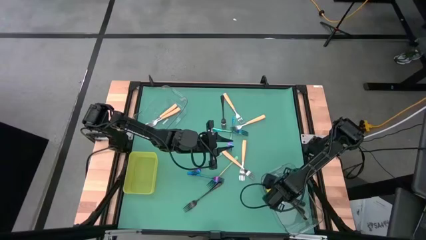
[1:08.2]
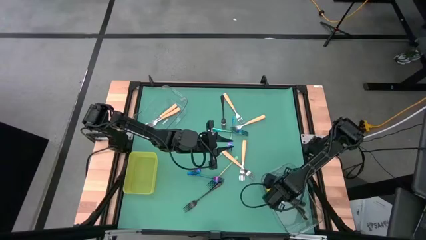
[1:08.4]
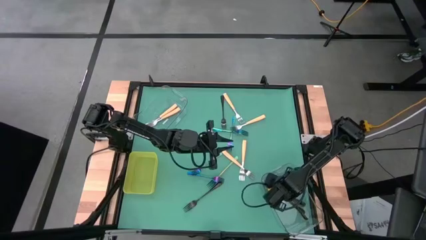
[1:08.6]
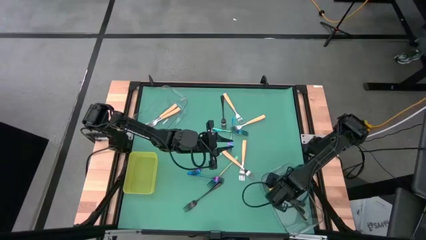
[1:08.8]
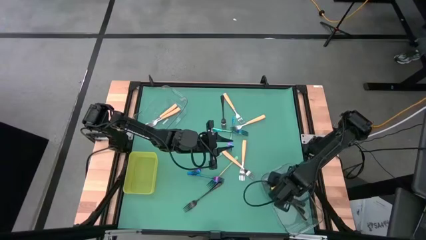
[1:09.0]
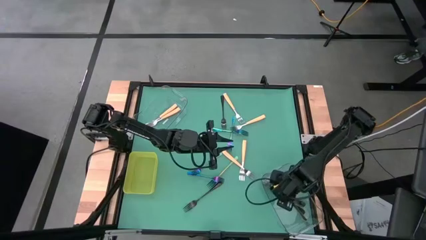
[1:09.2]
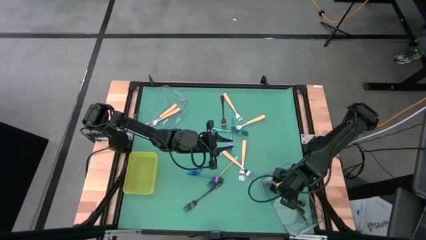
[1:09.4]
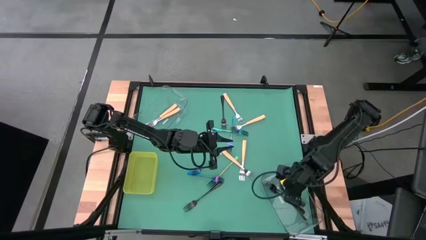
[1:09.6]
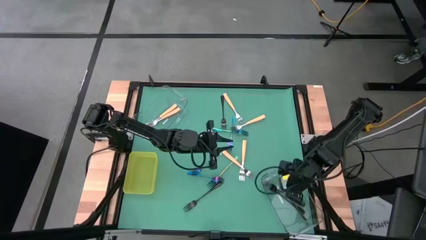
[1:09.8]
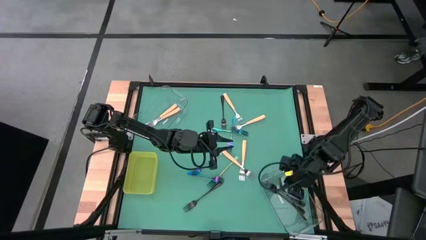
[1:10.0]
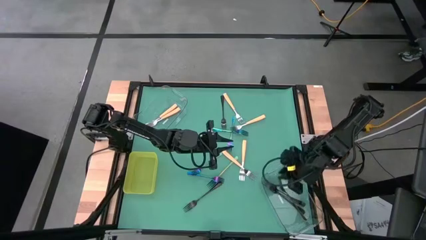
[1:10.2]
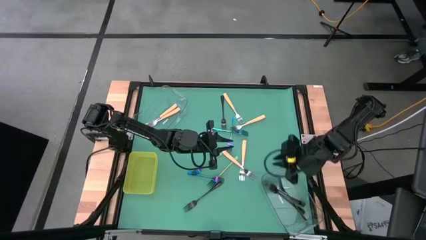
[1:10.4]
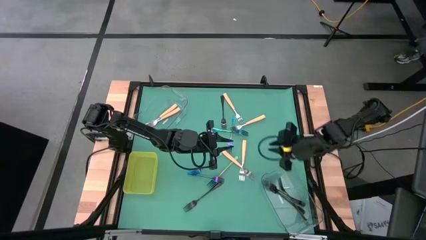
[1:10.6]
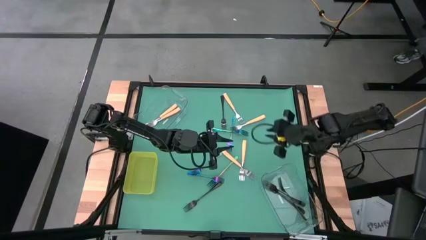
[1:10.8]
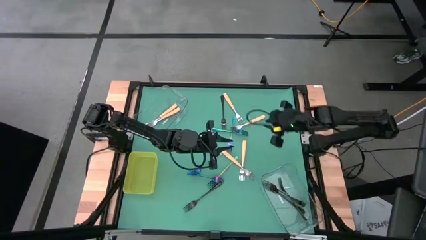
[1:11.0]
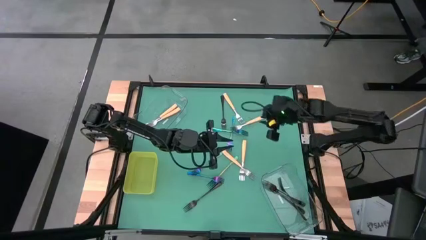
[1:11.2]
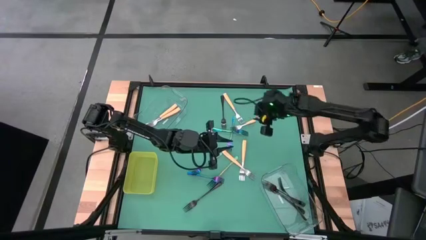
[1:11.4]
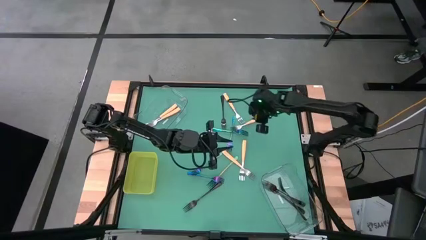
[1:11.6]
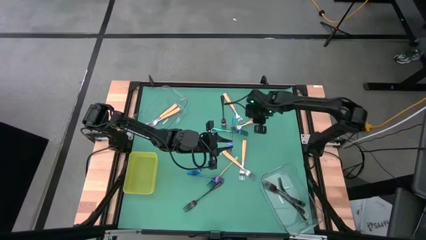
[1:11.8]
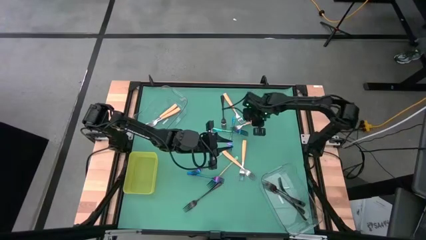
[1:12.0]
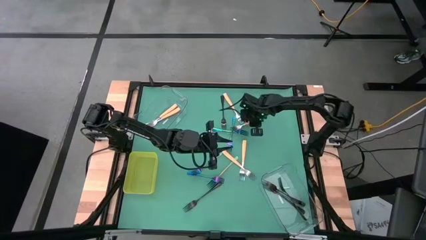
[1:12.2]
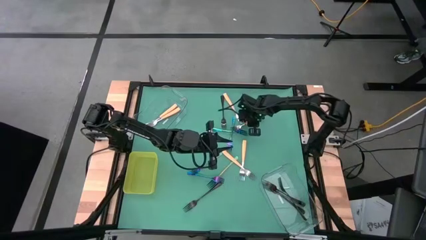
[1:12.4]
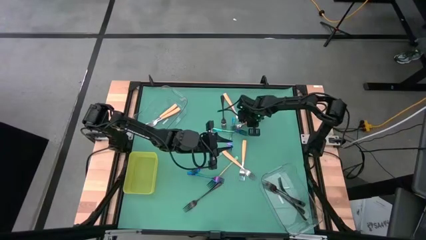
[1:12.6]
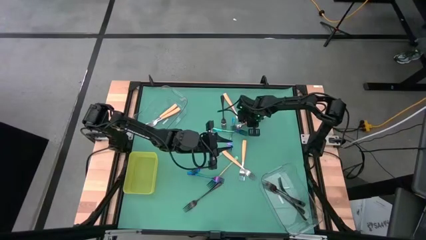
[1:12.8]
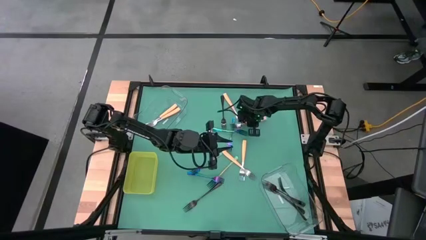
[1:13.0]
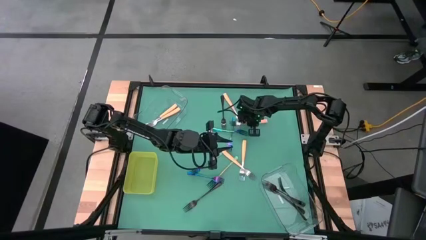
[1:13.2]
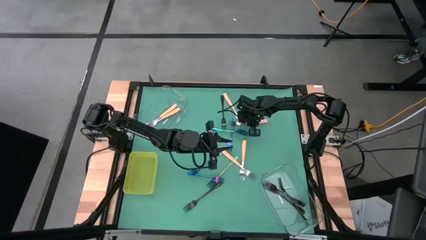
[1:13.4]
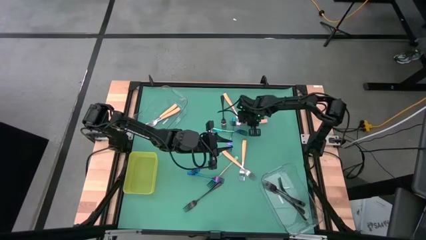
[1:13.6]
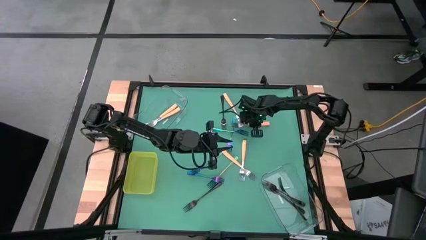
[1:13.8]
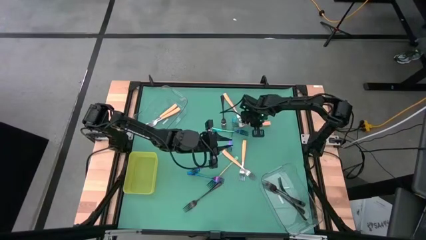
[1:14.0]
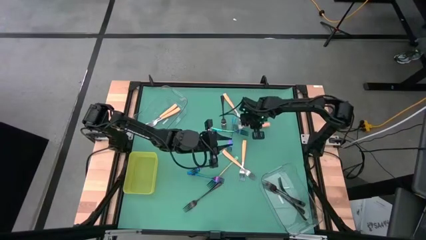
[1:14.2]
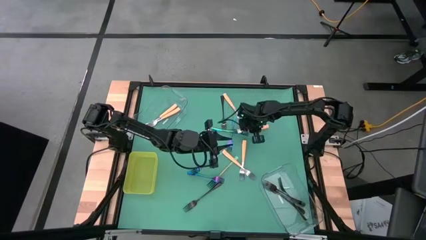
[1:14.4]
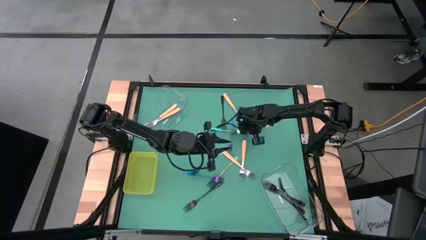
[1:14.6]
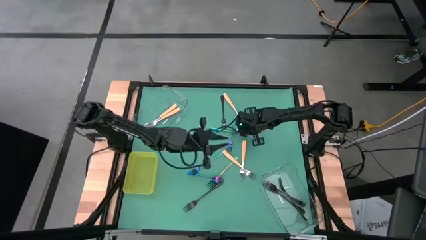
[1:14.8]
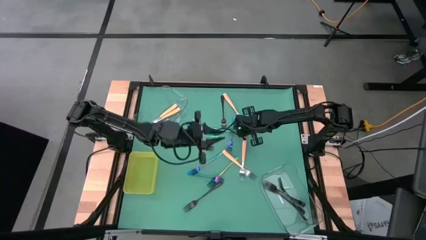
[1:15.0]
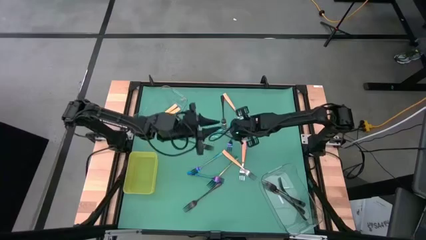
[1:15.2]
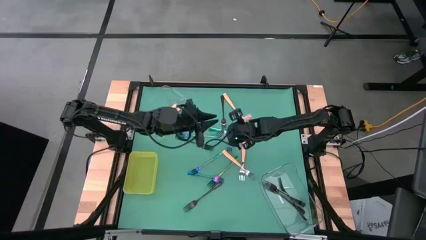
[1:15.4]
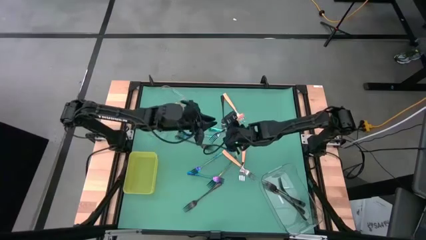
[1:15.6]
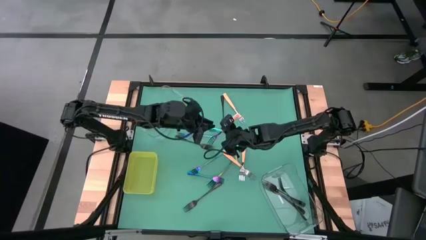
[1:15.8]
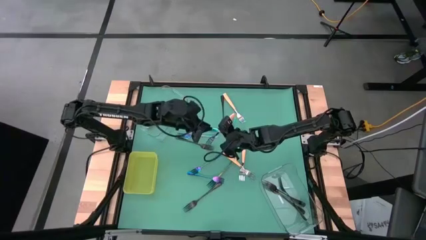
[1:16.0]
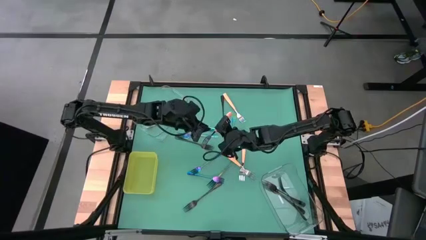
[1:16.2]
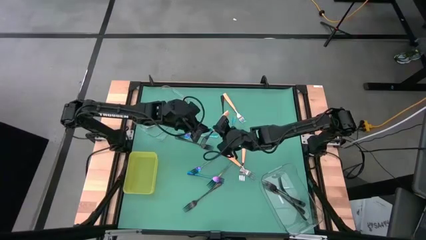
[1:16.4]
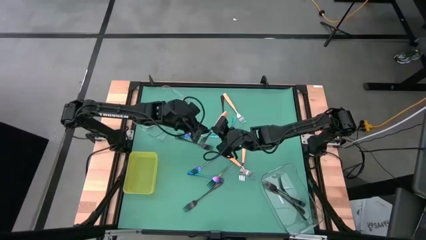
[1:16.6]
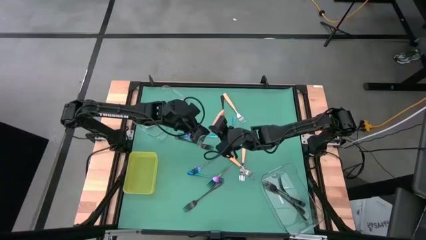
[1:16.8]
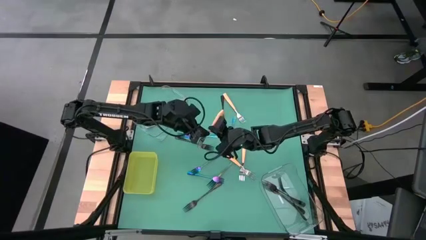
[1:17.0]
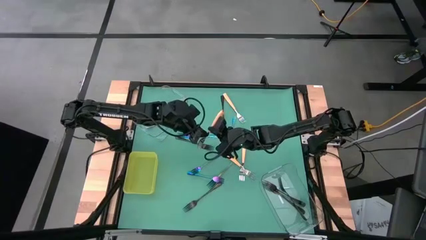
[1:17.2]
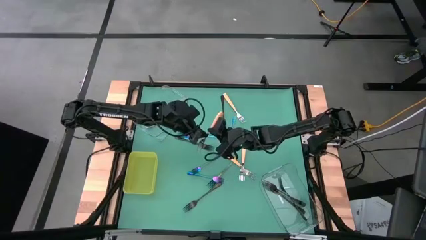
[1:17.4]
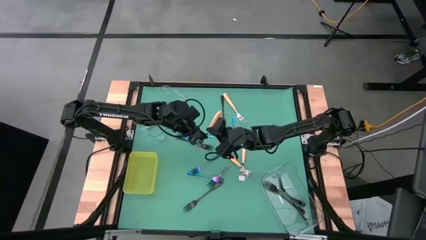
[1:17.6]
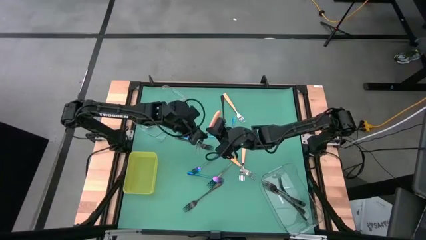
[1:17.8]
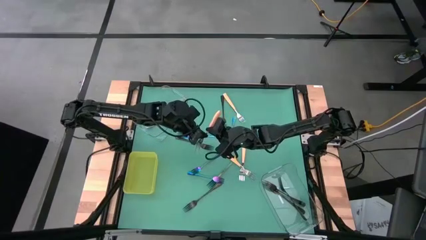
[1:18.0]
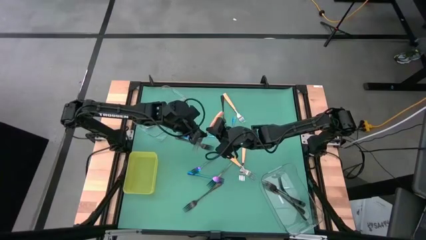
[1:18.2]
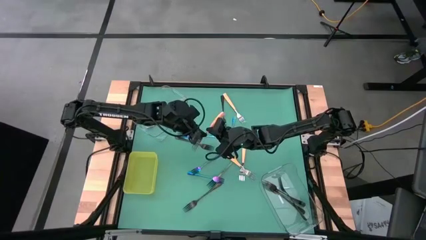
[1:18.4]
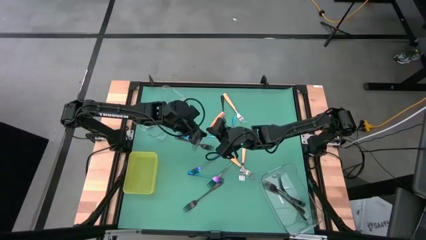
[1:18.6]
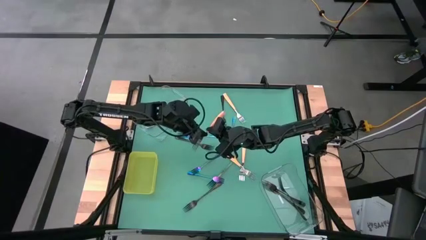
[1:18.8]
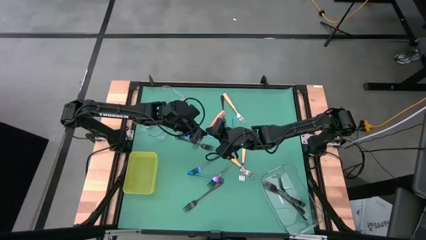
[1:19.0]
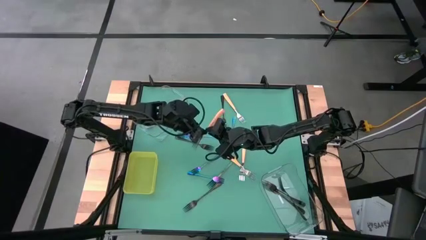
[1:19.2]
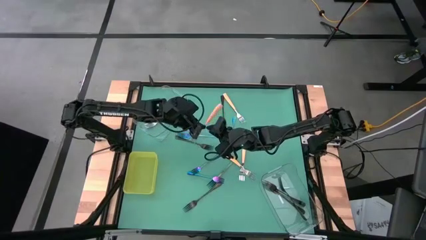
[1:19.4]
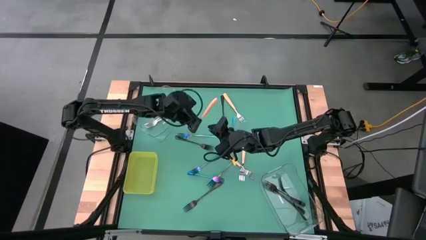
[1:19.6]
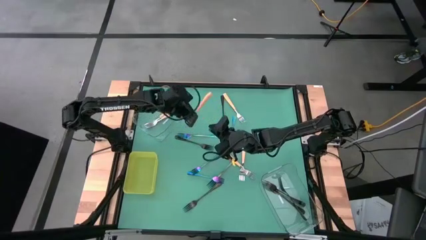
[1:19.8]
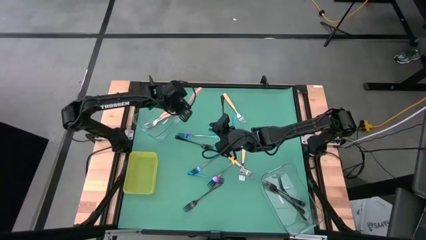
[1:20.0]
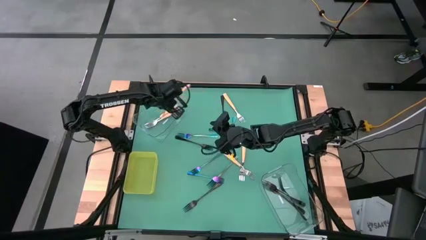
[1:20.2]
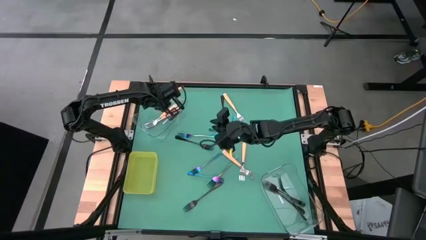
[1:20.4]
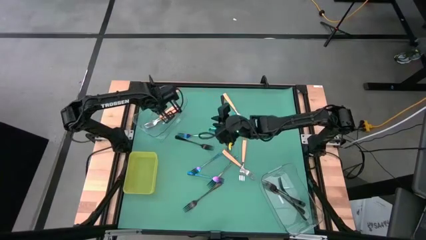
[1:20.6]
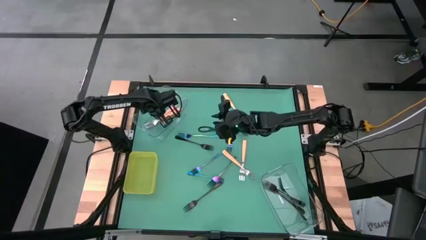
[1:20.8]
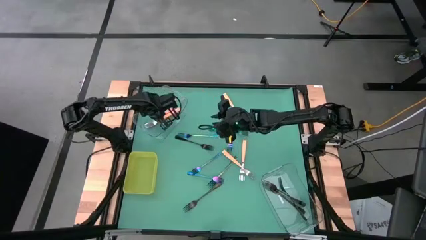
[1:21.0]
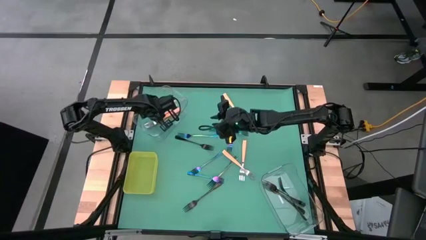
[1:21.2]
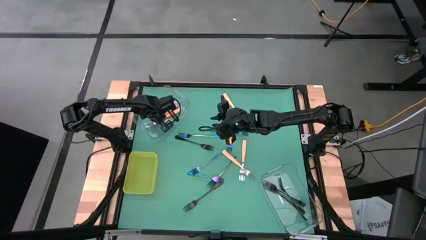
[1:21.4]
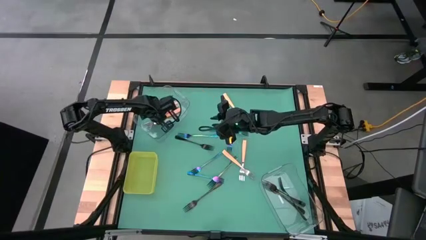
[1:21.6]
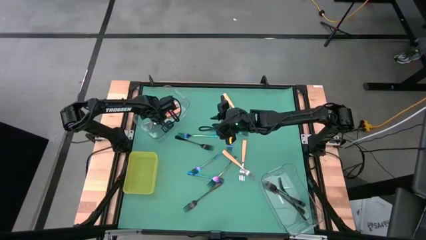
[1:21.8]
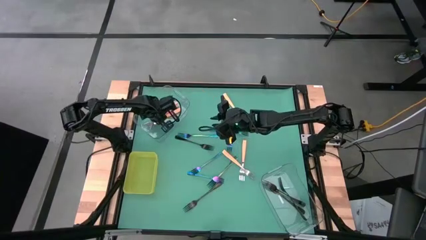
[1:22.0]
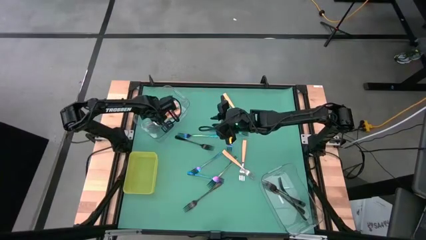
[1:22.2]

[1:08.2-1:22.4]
Task: Sort silverware by color (type)
Put the orange fork in the top transparent bin
